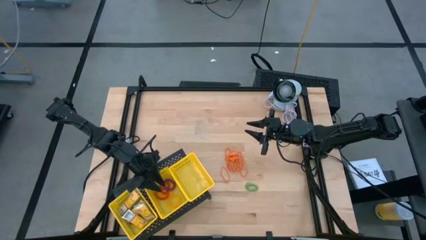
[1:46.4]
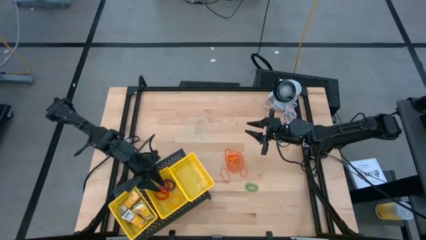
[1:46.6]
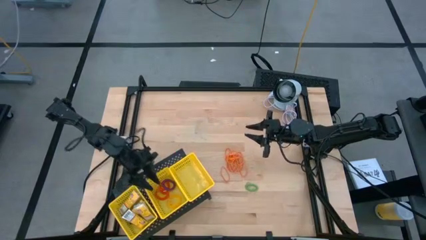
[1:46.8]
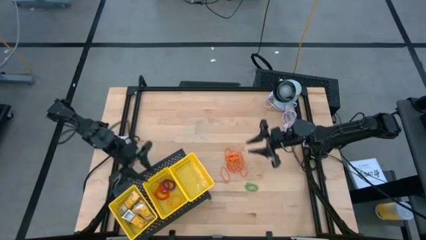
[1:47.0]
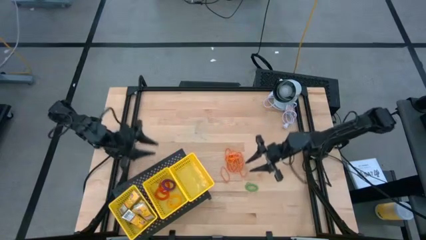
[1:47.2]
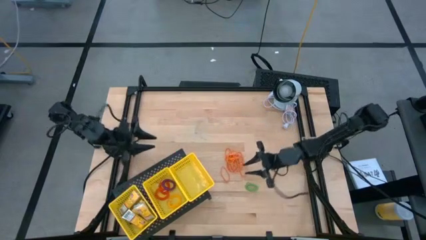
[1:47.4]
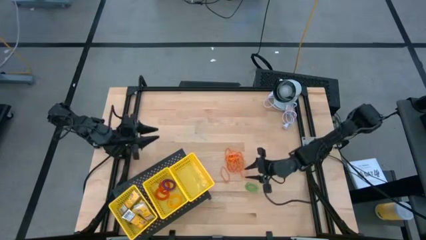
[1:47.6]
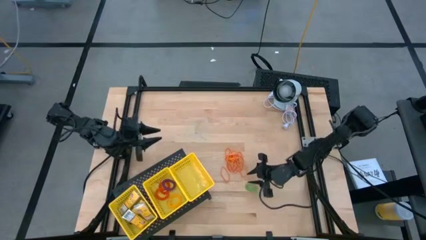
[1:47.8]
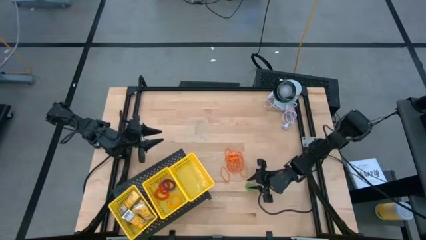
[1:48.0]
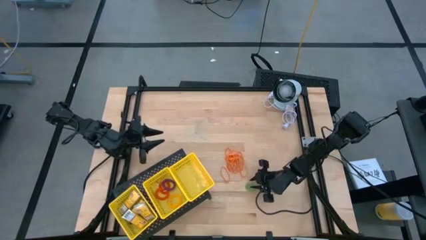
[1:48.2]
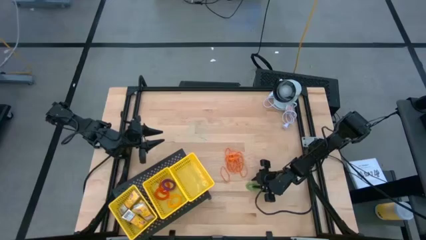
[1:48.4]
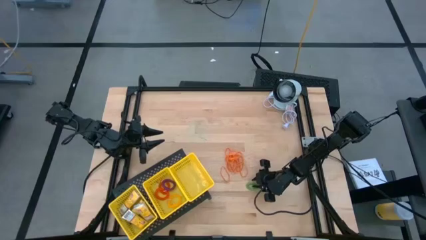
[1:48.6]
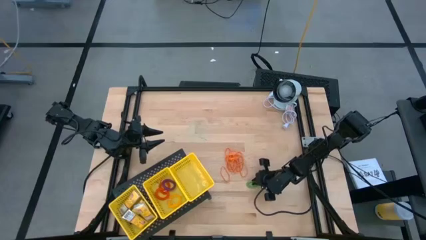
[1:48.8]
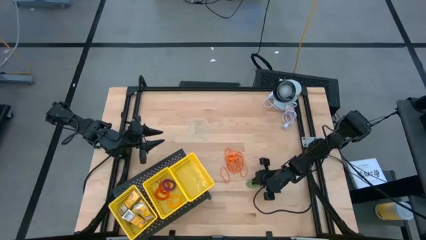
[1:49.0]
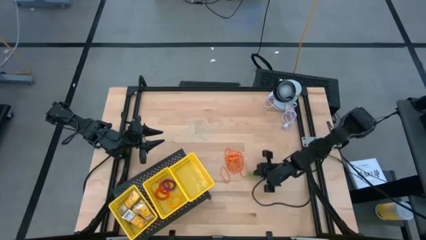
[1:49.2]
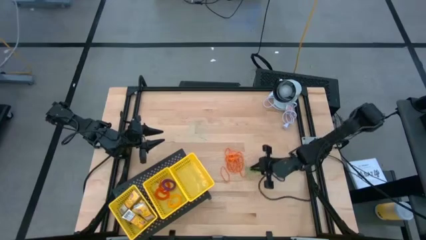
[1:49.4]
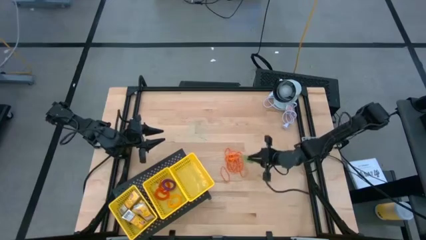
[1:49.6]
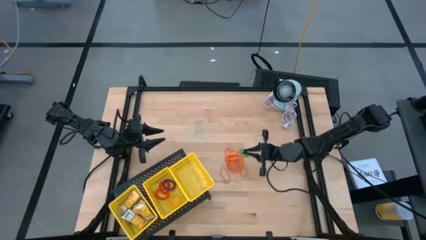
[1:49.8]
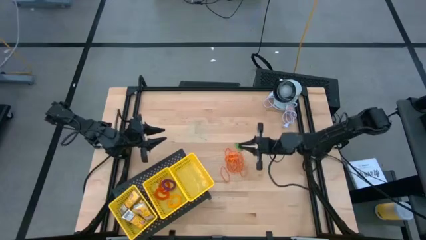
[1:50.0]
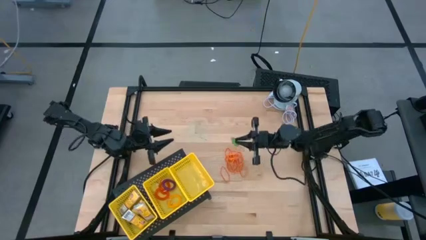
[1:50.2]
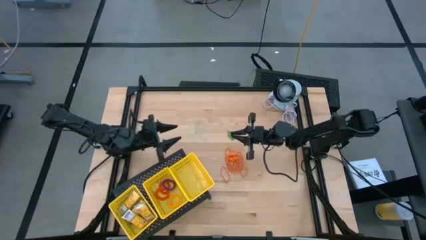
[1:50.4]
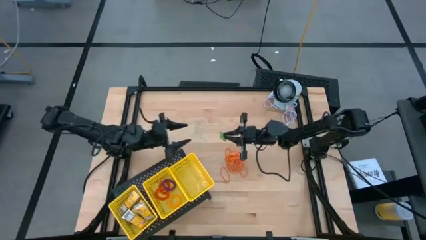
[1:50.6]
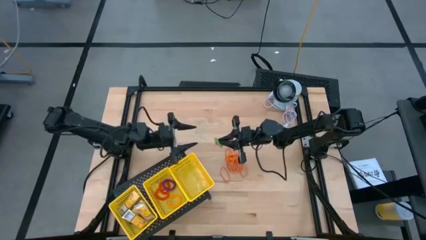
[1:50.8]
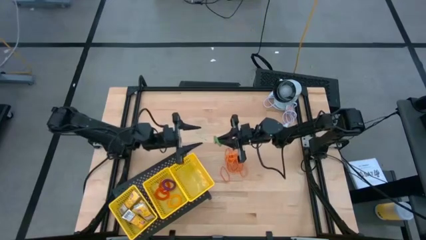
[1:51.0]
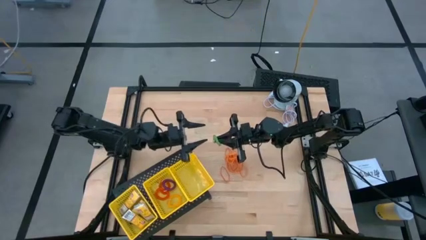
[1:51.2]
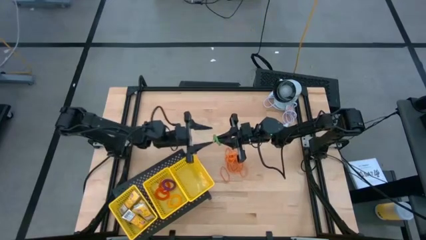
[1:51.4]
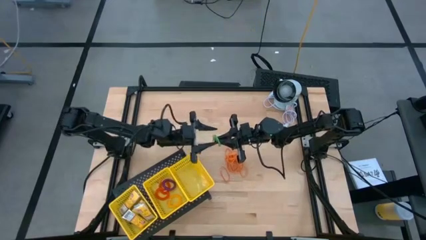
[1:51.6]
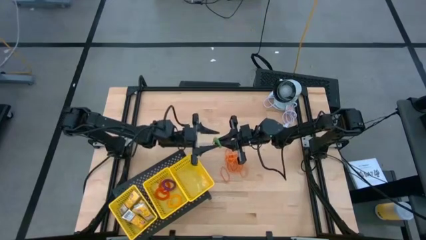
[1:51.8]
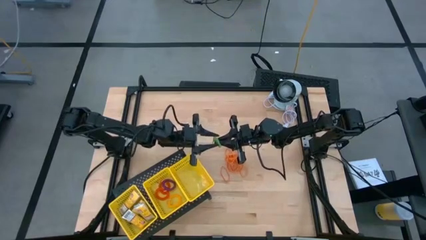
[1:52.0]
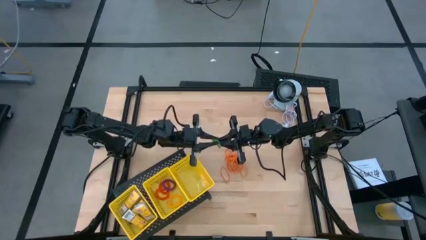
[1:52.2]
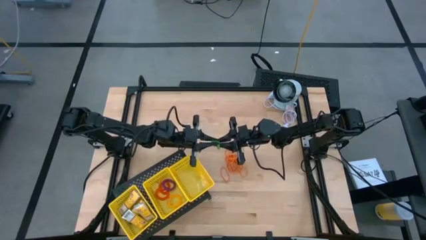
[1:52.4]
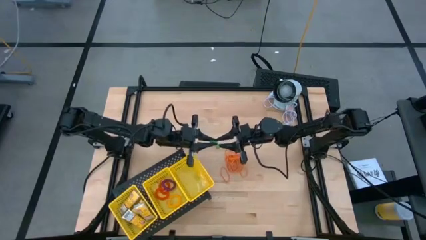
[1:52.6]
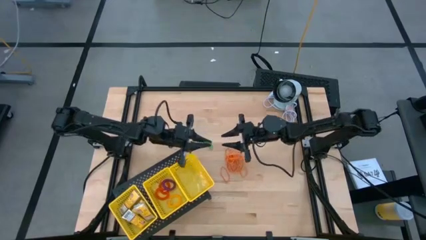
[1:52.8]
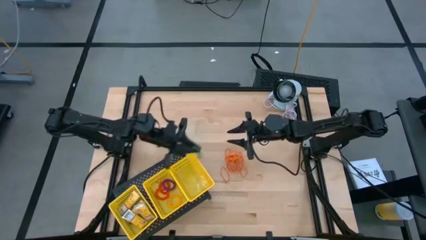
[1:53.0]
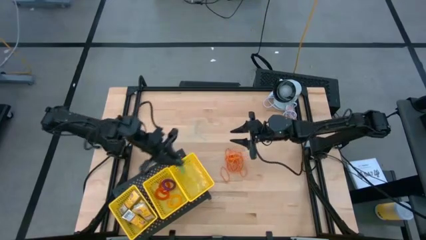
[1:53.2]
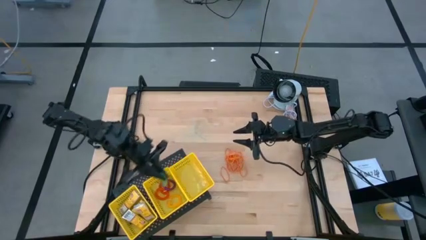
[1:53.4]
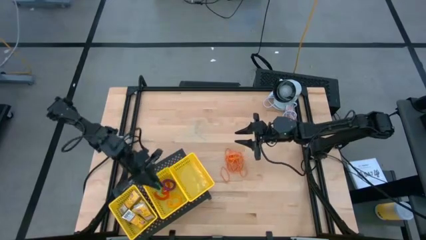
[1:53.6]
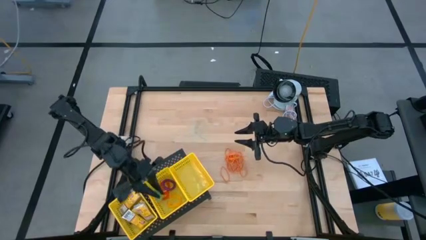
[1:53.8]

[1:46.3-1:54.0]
Task: Pick & Place Office Desk Supplies
Put the green spring keychain into the center yellow bin on the shelf

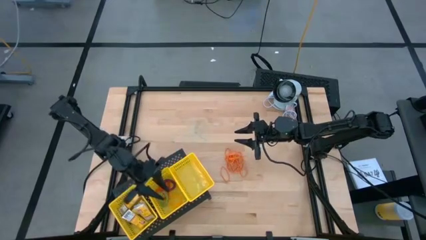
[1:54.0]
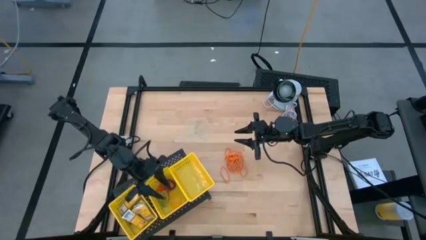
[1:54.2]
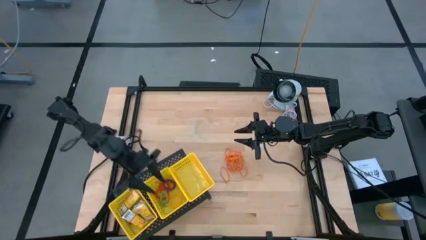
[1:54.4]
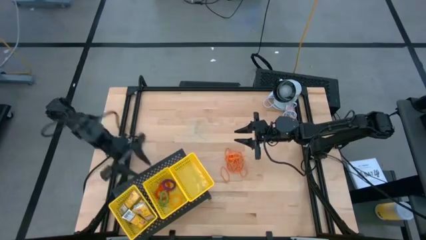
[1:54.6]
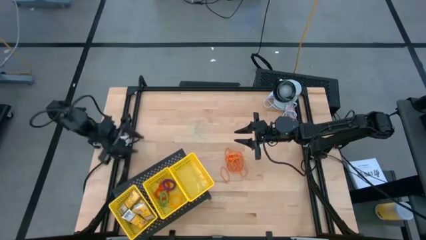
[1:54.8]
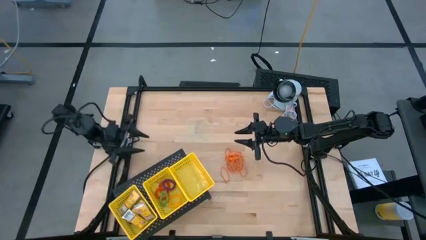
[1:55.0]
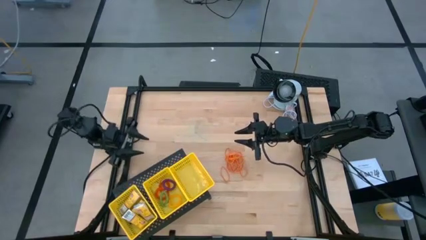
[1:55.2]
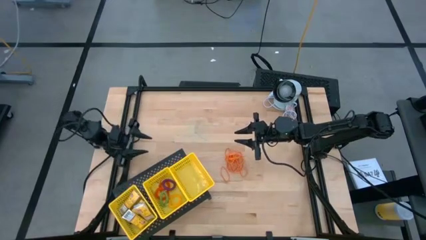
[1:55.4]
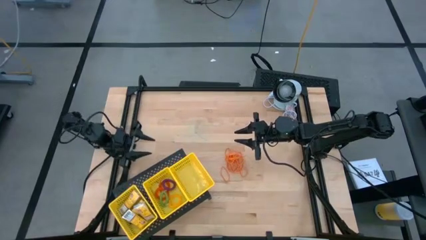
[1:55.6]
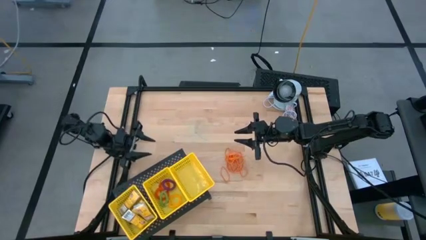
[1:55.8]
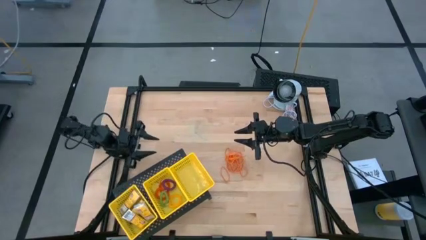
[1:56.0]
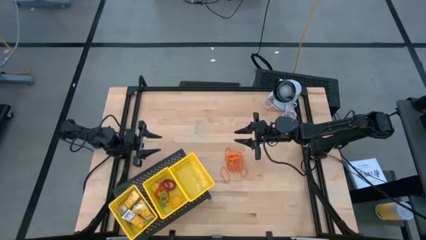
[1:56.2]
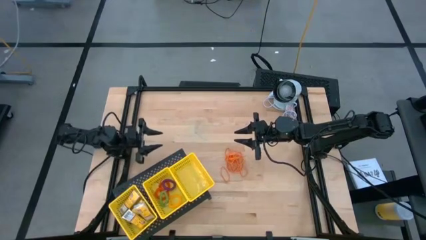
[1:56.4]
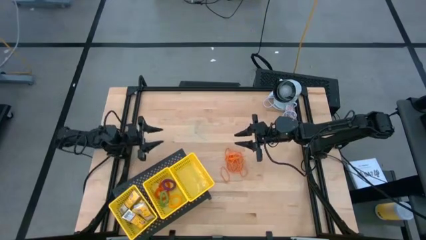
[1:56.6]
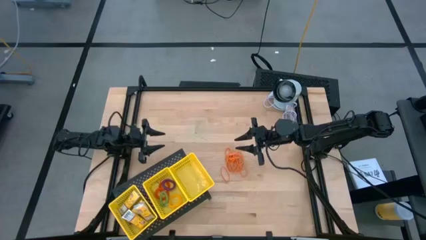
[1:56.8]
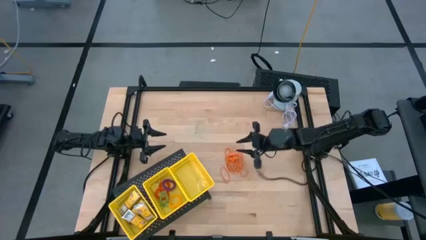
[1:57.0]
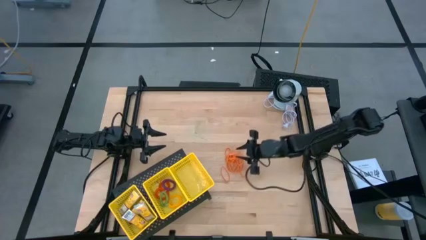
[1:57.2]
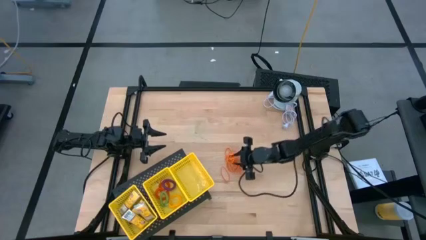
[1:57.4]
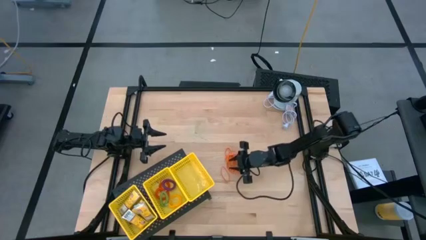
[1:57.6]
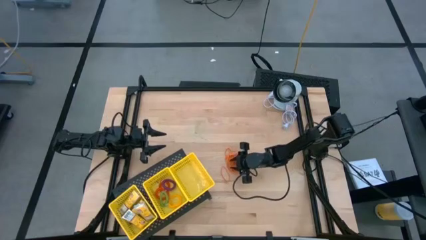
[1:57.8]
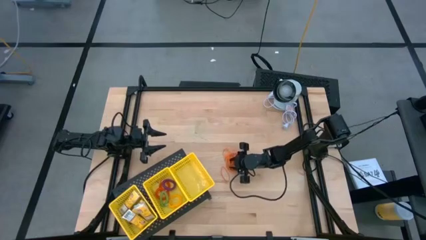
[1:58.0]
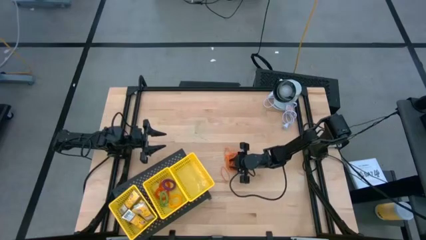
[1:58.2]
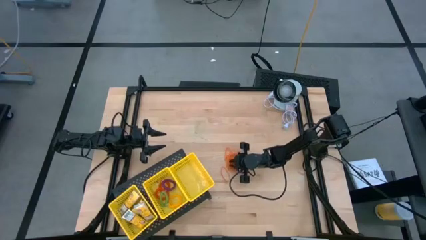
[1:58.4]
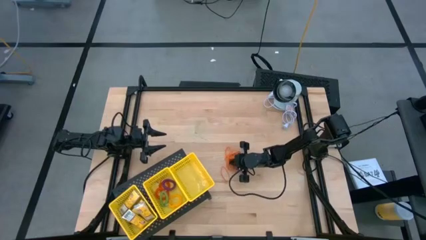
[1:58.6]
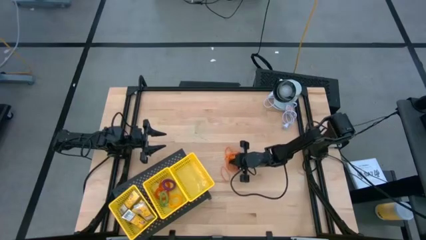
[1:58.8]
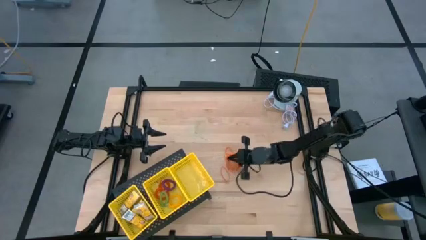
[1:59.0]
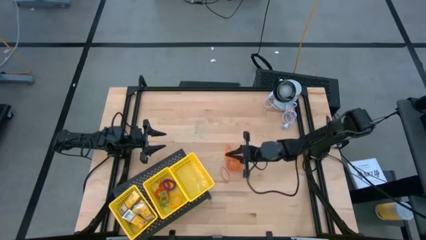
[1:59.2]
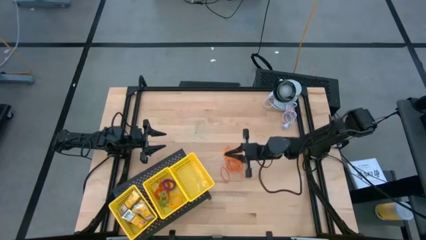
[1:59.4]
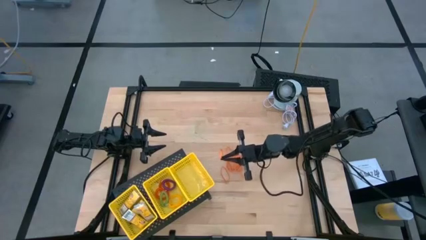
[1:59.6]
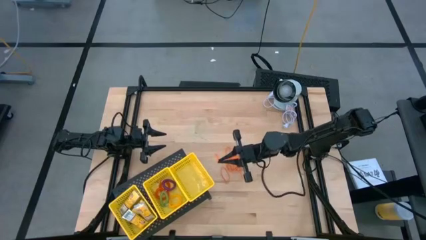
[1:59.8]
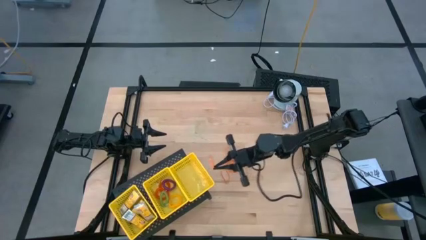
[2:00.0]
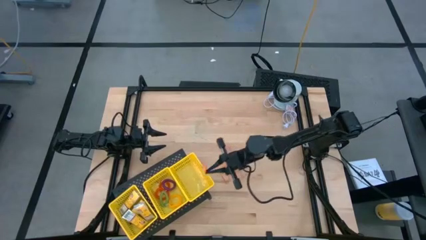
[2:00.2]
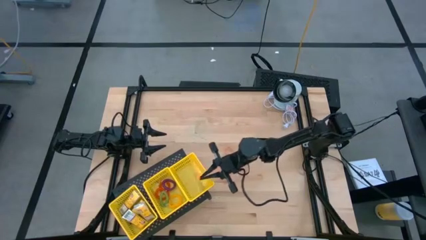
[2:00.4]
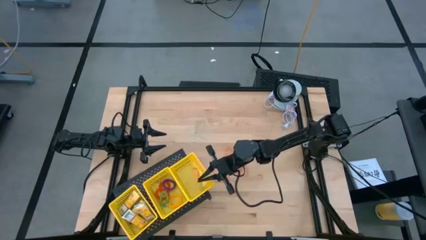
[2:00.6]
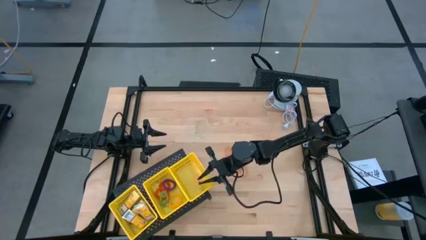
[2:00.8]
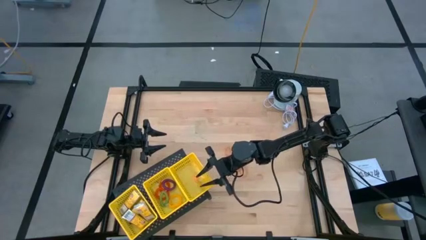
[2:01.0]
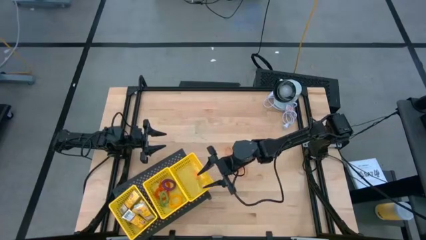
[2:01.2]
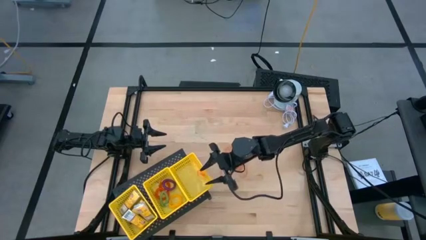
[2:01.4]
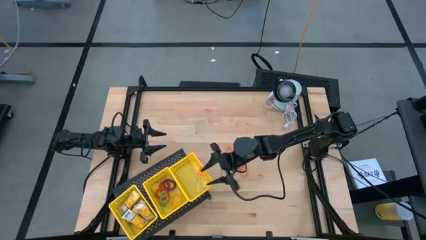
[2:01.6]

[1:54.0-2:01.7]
Put the orange rubber band into the right yellow bin on the shelf
